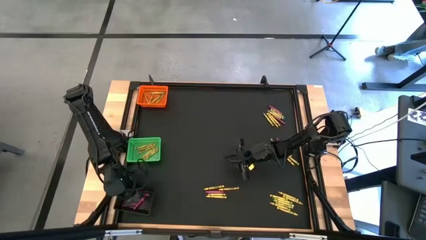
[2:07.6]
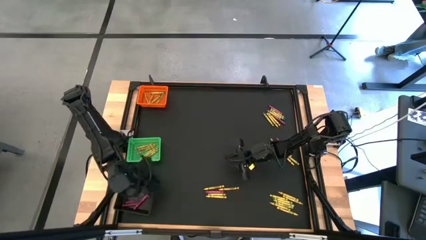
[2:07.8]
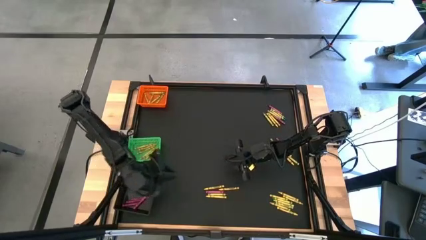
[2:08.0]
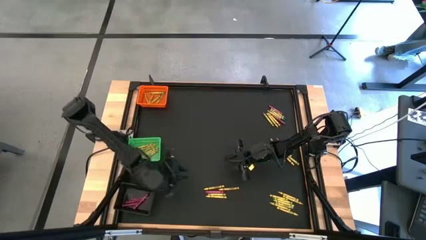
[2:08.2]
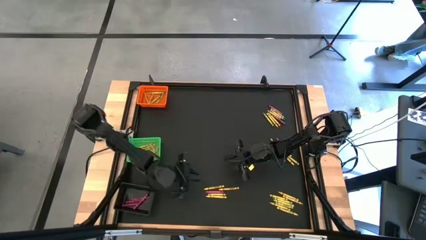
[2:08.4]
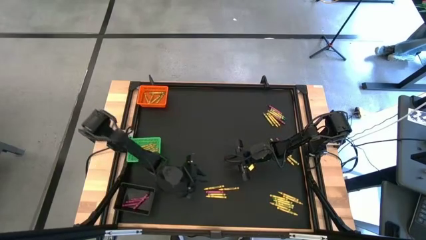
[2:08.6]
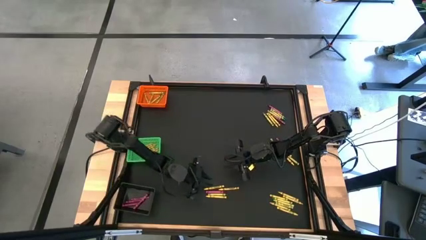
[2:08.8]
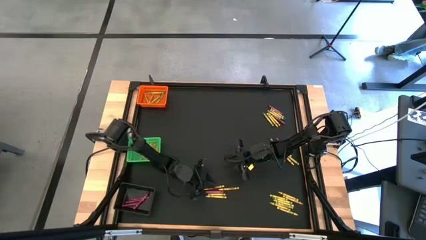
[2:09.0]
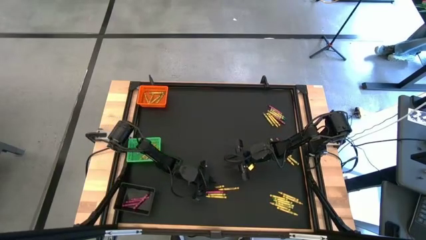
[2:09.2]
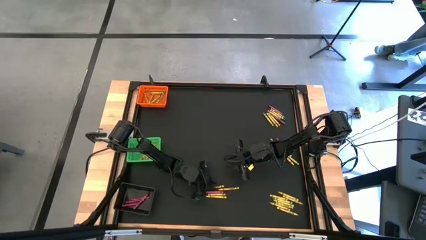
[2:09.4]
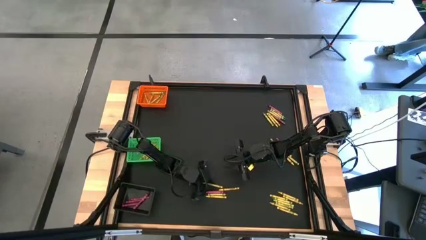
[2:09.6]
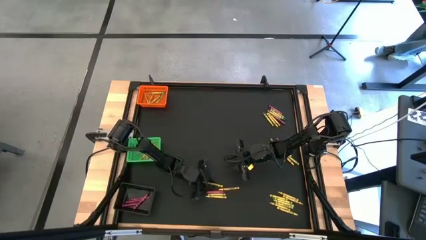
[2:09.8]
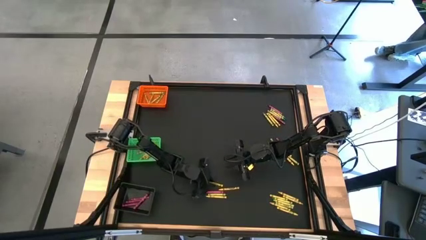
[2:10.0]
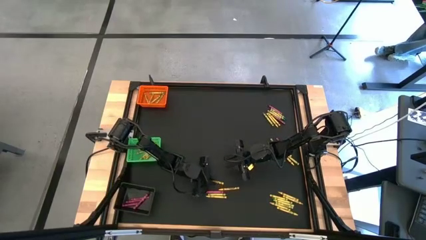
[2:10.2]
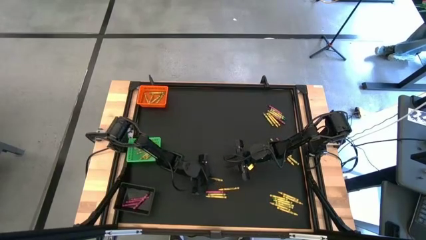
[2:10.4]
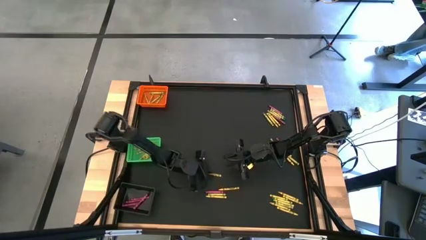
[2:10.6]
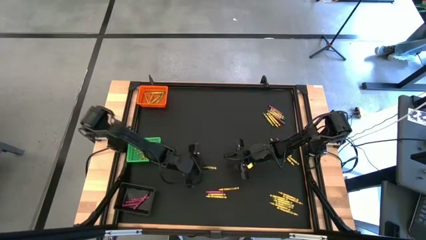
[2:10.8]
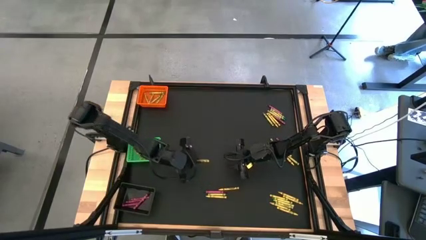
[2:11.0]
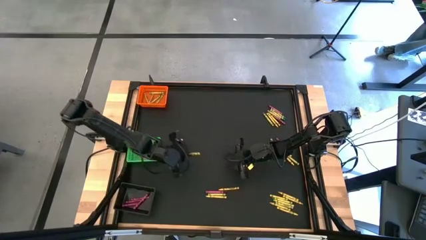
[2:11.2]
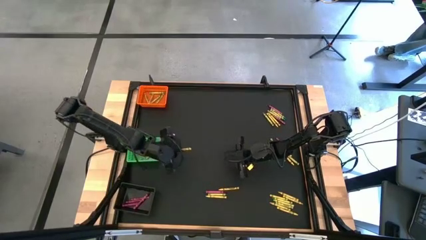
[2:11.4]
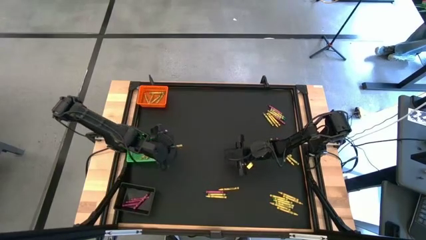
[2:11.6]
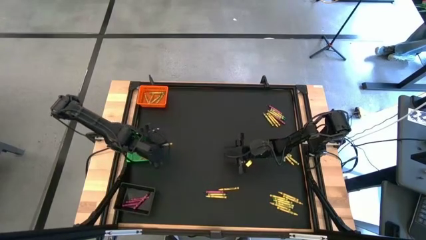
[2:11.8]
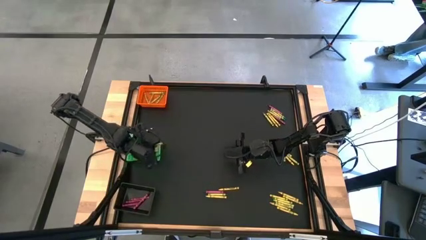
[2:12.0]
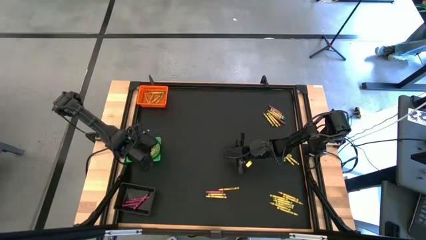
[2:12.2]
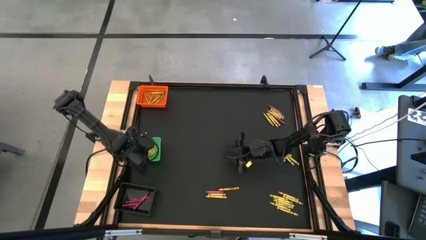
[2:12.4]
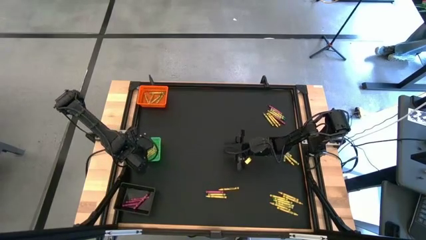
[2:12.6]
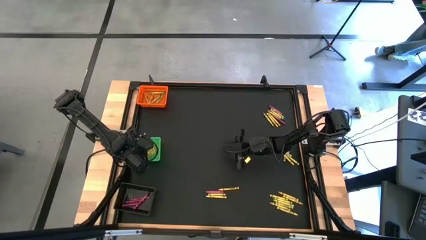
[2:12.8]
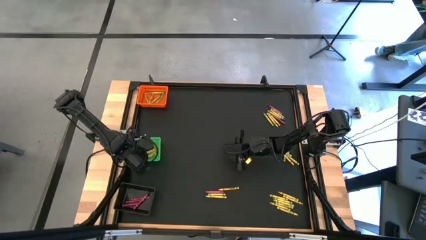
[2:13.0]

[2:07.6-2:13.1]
Task: Sort crayons
Put the yellow crayon into the green bin

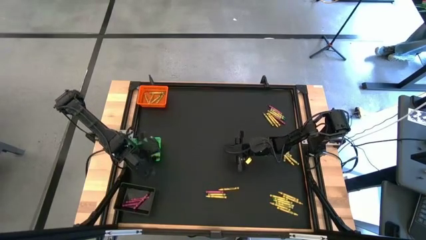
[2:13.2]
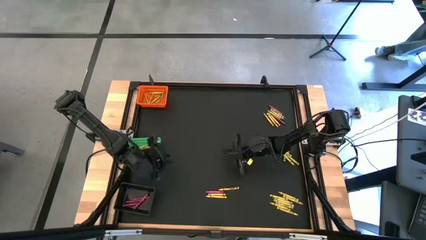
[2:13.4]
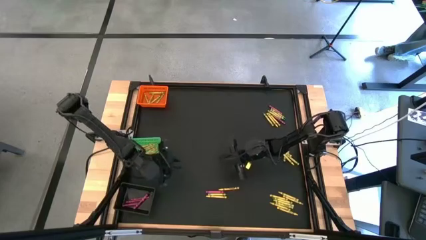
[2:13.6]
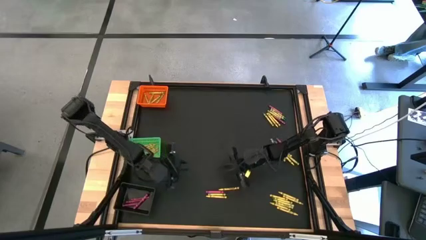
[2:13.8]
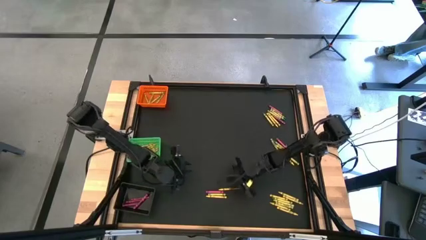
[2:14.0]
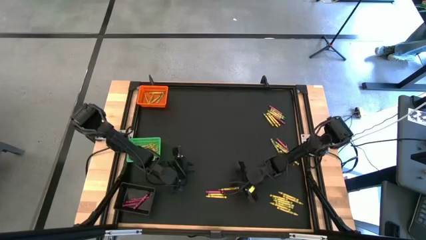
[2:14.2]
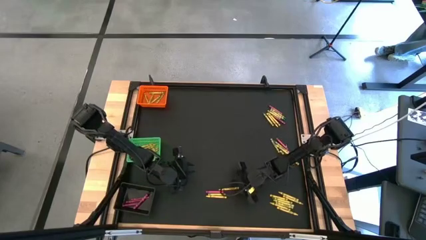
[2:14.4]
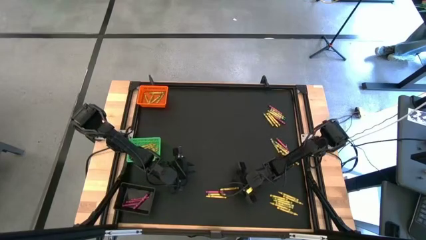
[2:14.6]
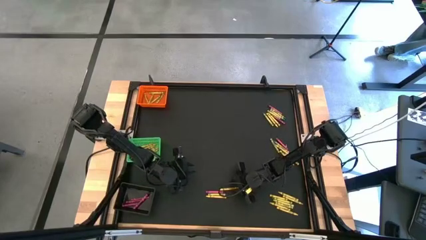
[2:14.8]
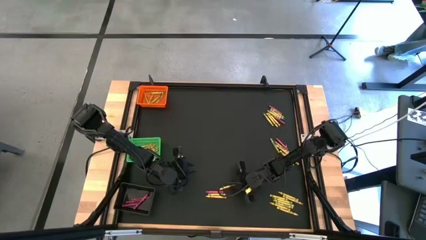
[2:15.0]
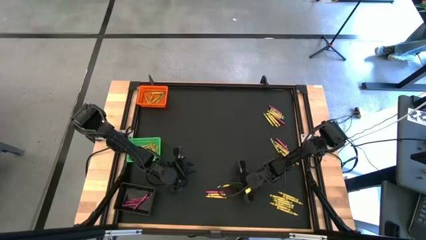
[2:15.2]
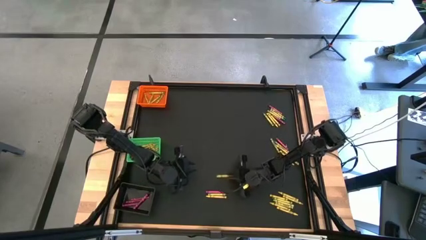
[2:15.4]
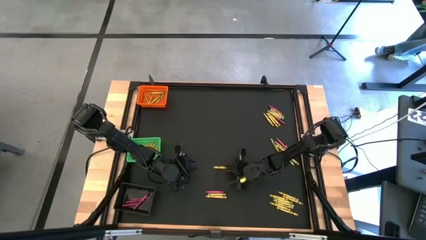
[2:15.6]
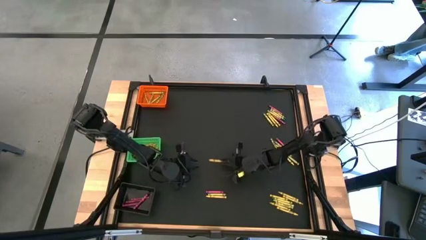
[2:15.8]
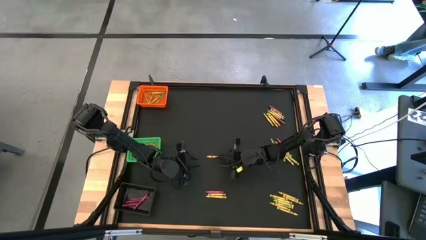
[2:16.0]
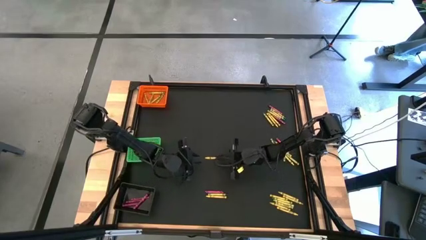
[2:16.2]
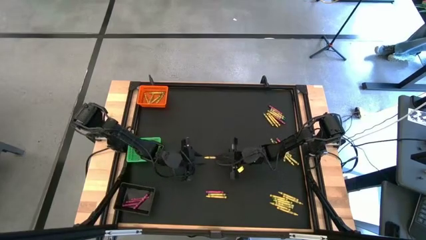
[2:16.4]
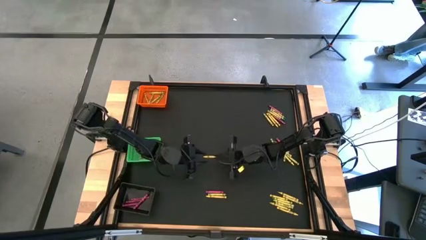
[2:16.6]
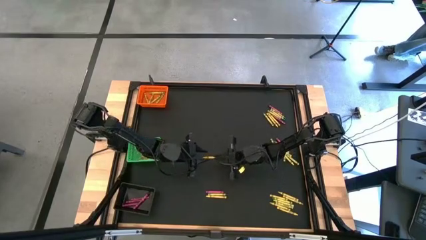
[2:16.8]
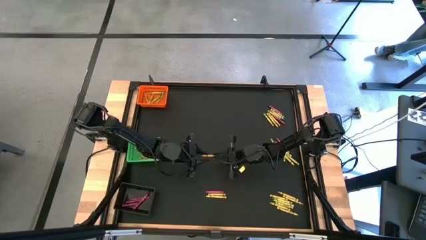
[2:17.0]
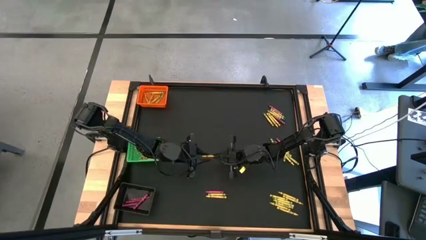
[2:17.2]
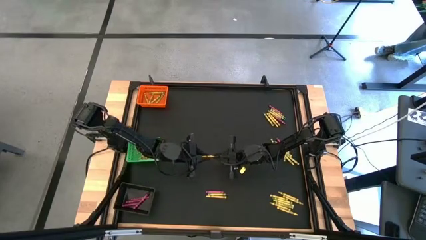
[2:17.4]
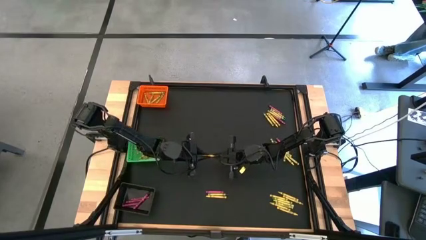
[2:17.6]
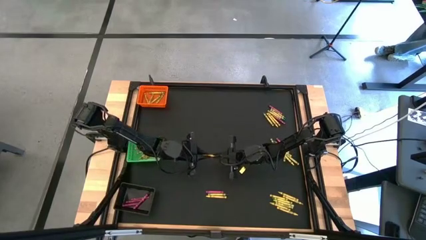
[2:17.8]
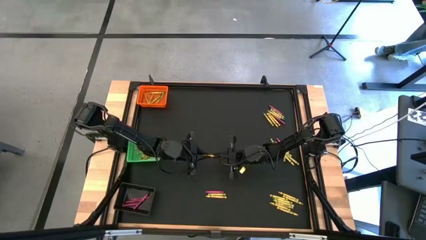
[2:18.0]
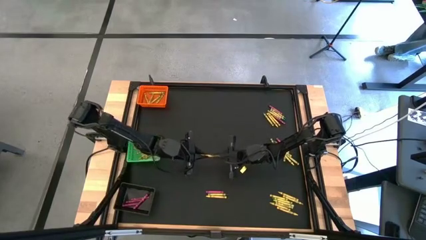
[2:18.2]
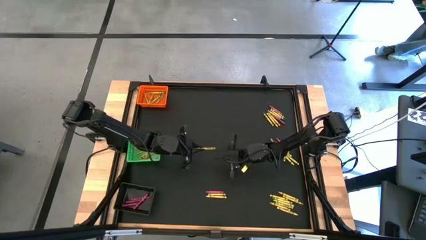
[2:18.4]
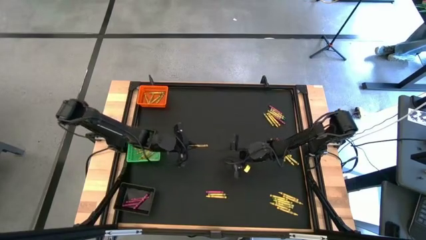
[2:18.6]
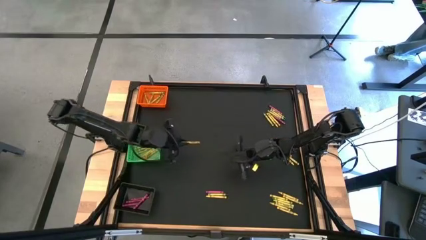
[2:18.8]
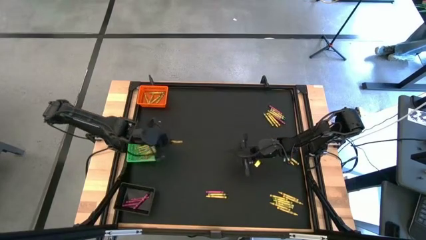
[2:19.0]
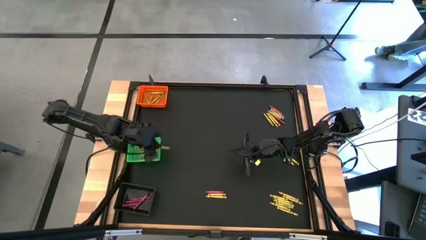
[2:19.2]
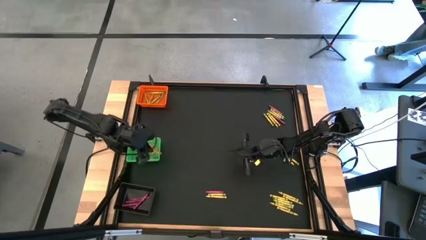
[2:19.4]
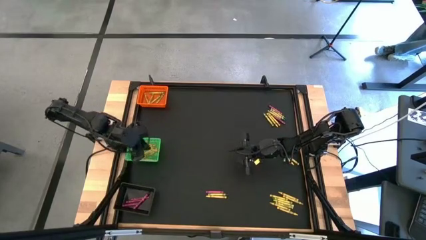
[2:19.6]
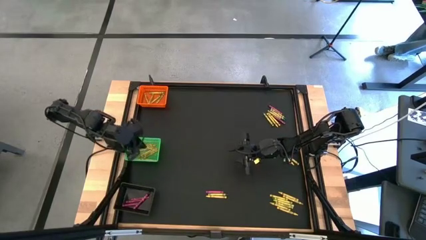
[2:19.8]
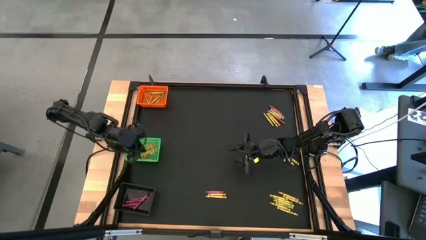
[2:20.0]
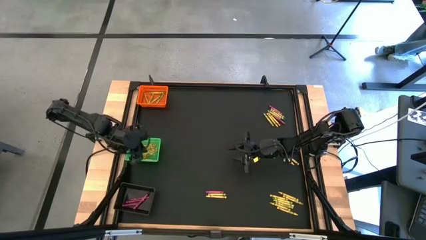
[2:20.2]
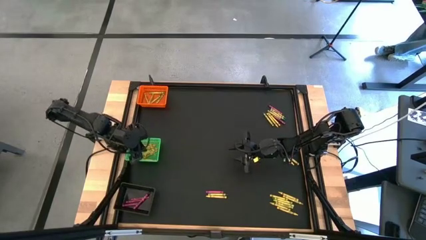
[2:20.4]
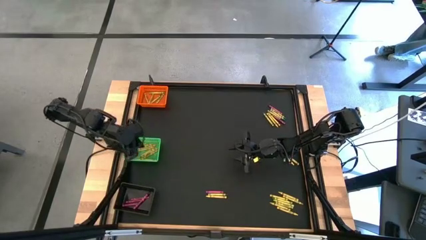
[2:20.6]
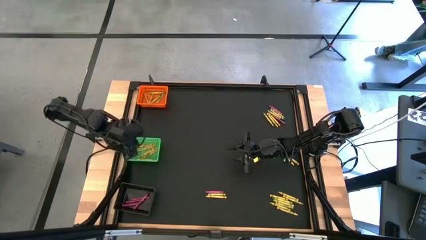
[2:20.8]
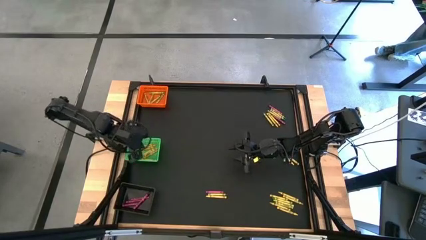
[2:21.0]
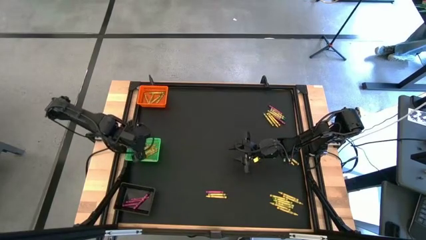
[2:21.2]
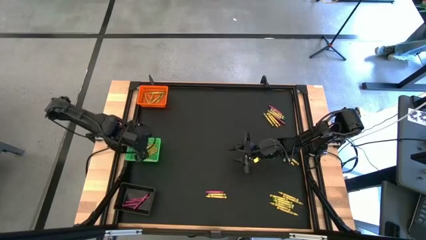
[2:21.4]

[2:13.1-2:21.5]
Put the yellow crayon into the green bin

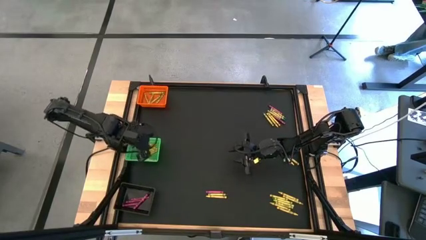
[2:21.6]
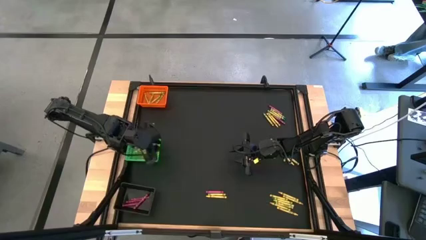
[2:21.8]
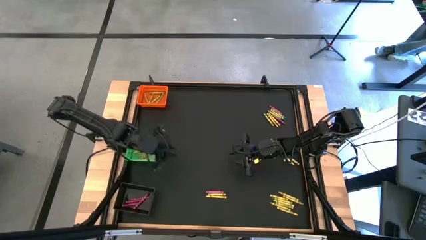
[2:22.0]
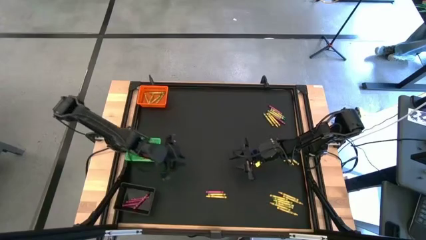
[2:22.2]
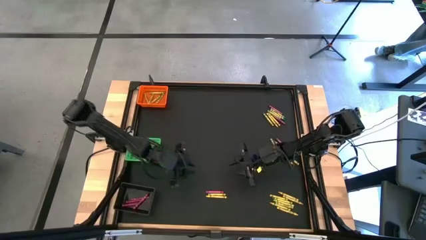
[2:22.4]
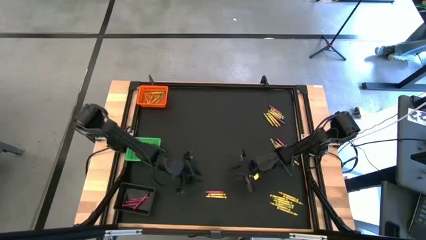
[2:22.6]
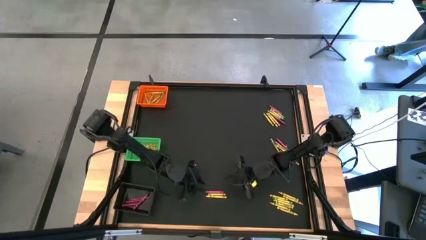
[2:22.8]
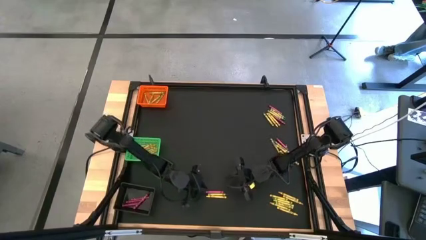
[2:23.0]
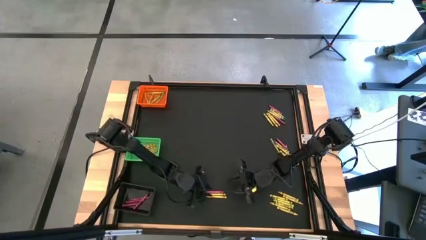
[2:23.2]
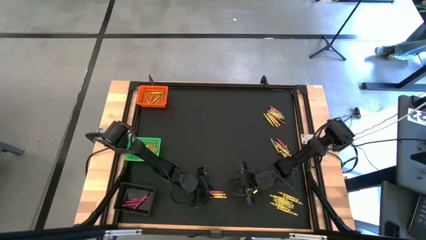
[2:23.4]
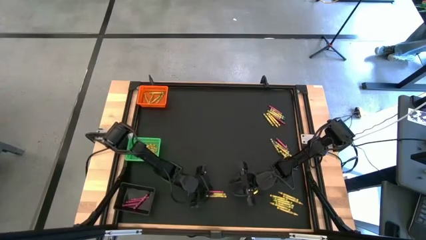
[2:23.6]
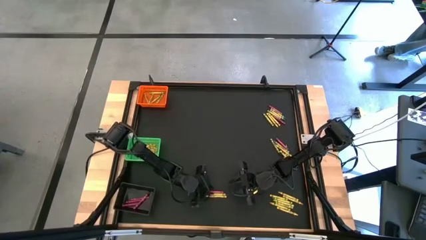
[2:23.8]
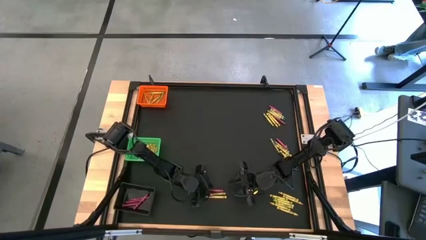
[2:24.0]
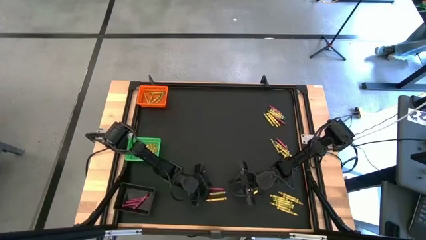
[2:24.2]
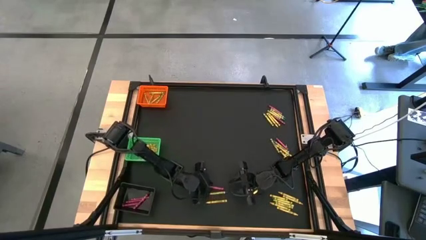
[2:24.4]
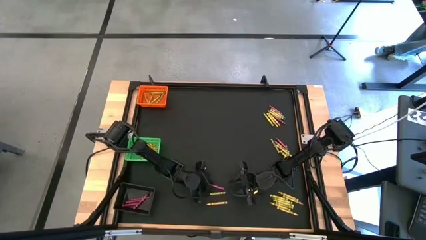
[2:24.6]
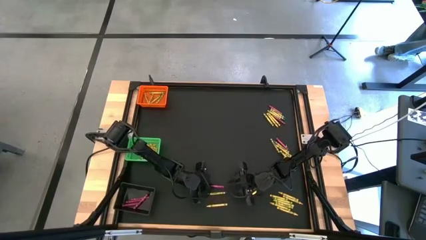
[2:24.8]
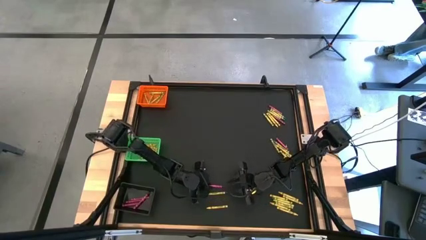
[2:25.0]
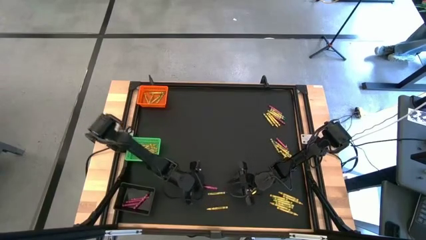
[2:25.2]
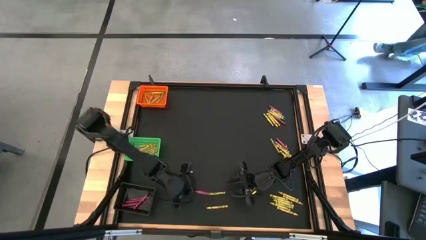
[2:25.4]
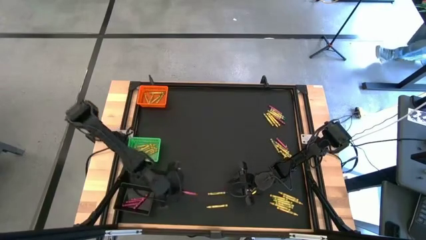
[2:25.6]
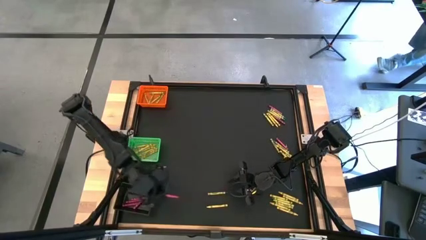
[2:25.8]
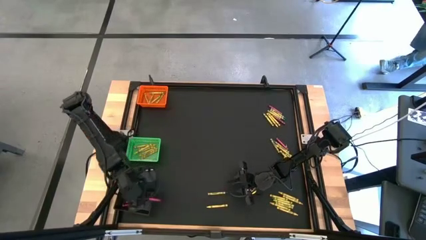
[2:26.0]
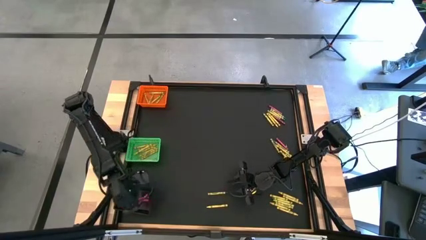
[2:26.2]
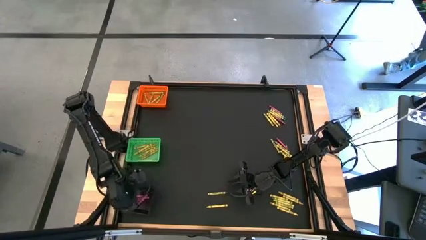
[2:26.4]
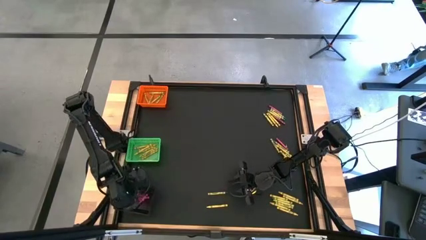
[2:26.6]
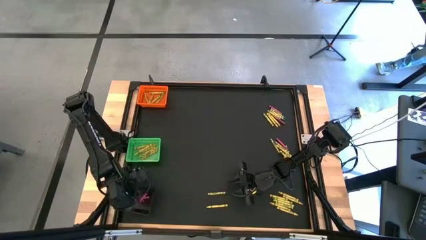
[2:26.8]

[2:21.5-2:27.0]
Put the pink crayon into the black bin
